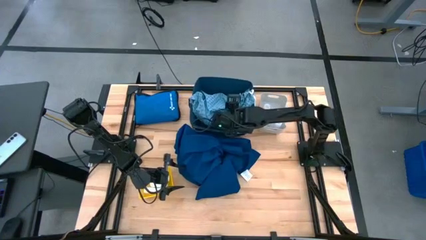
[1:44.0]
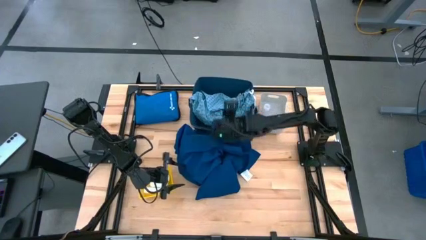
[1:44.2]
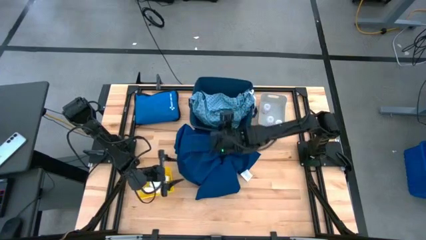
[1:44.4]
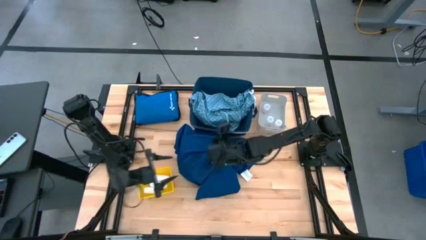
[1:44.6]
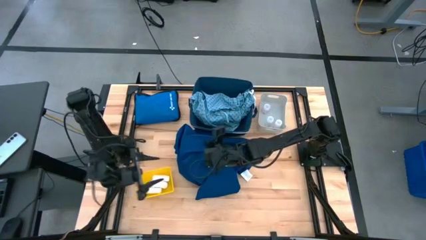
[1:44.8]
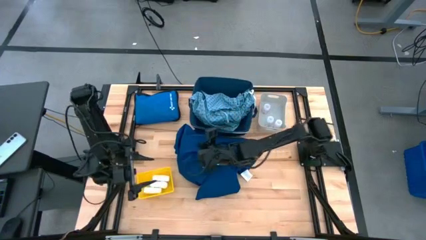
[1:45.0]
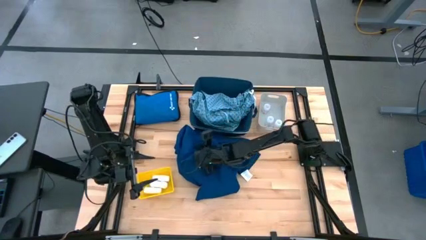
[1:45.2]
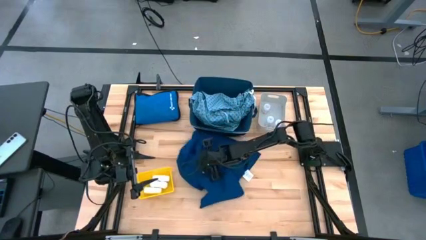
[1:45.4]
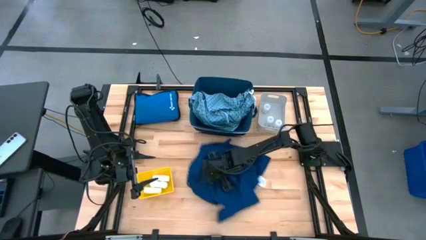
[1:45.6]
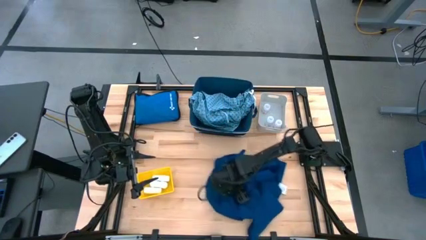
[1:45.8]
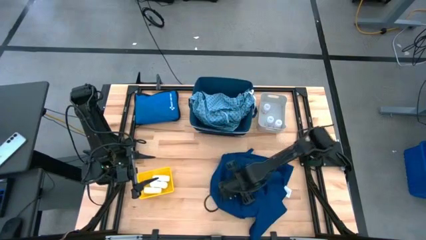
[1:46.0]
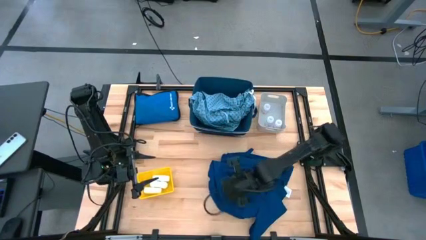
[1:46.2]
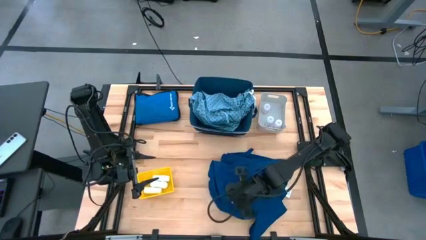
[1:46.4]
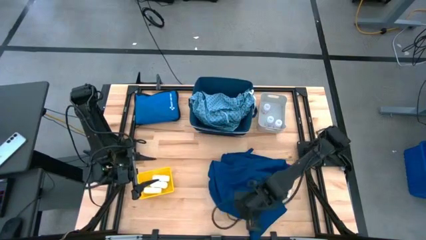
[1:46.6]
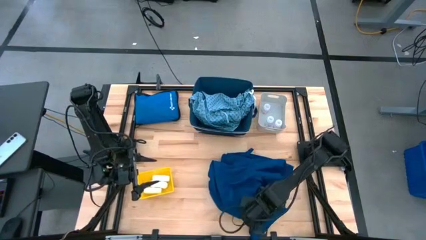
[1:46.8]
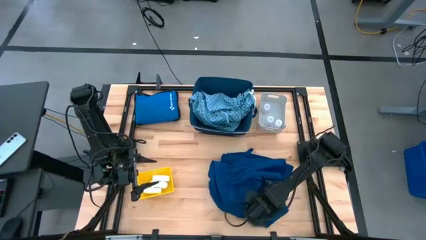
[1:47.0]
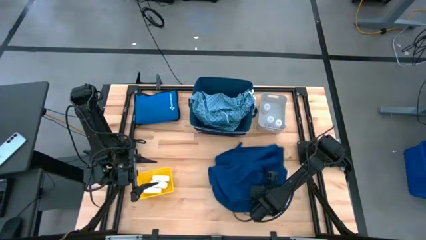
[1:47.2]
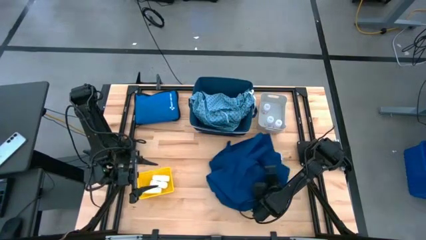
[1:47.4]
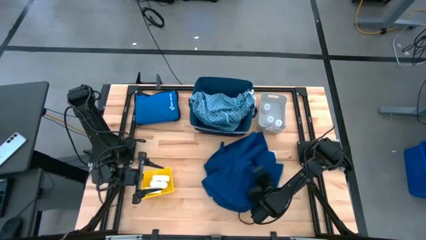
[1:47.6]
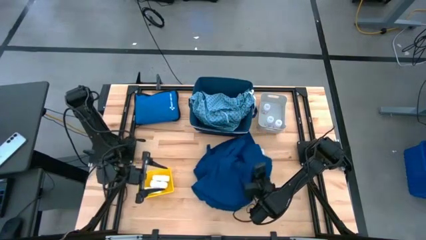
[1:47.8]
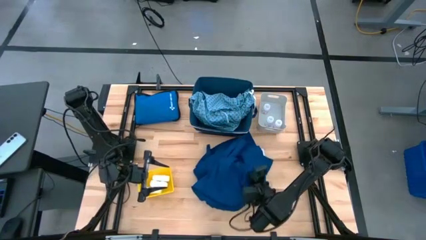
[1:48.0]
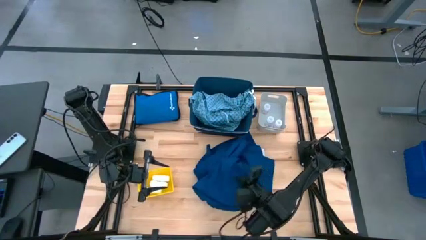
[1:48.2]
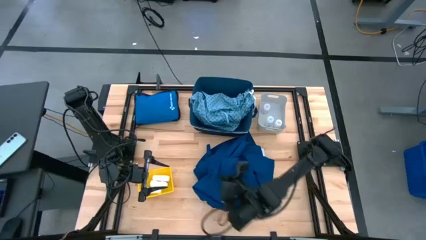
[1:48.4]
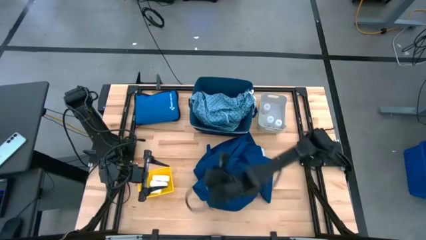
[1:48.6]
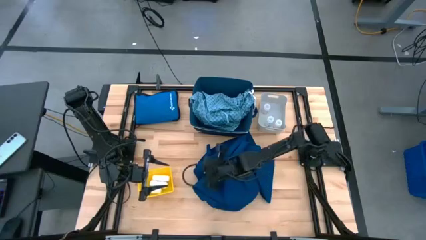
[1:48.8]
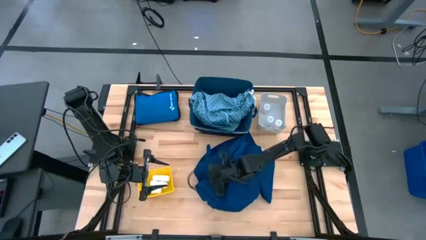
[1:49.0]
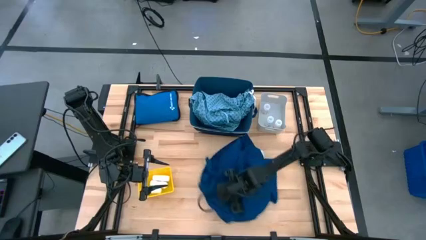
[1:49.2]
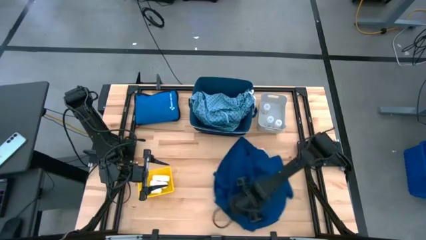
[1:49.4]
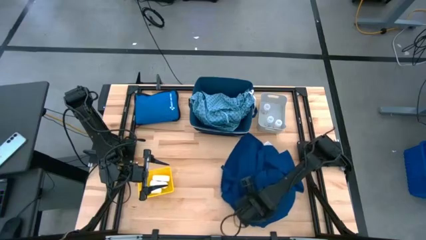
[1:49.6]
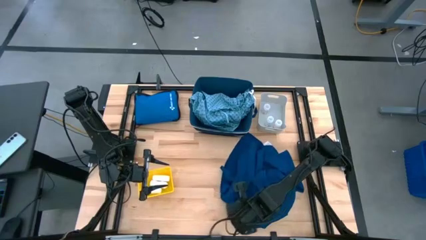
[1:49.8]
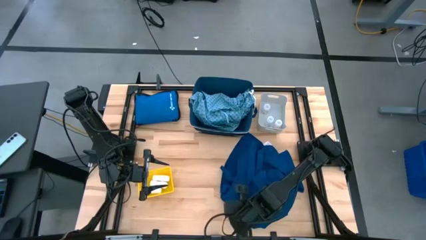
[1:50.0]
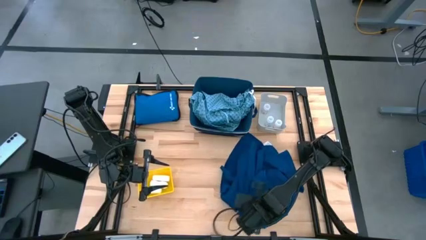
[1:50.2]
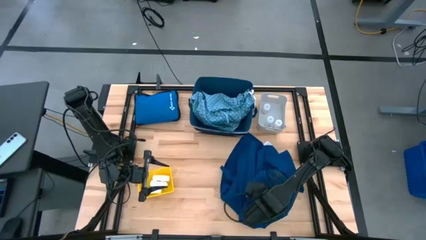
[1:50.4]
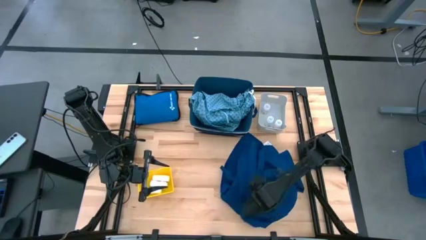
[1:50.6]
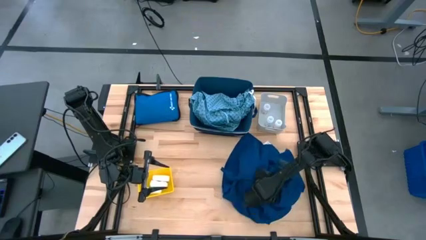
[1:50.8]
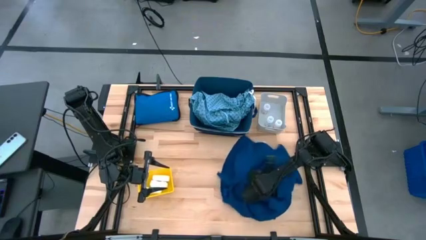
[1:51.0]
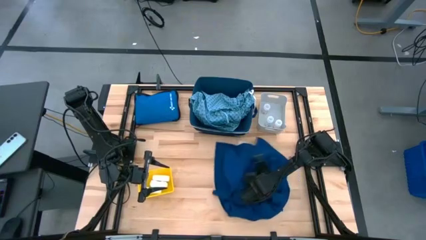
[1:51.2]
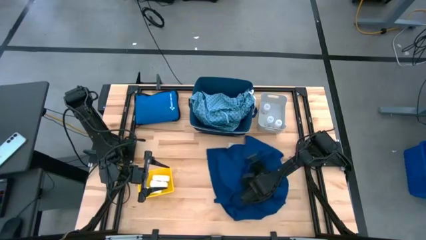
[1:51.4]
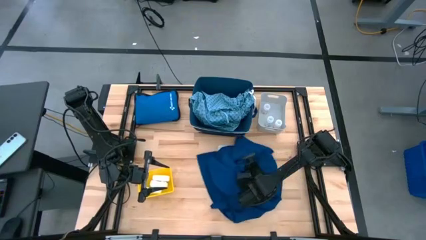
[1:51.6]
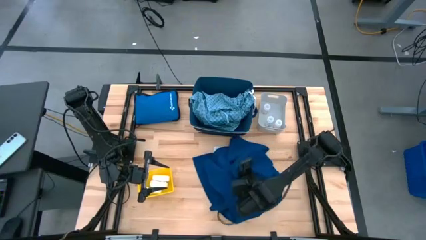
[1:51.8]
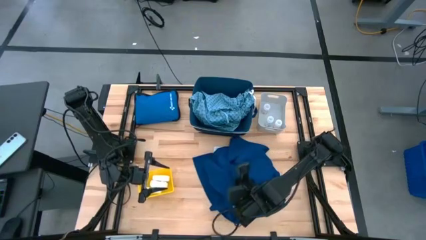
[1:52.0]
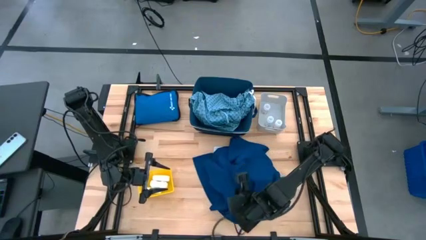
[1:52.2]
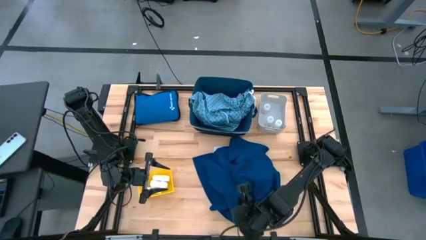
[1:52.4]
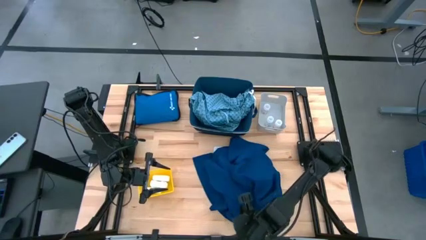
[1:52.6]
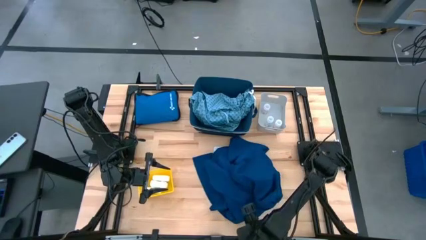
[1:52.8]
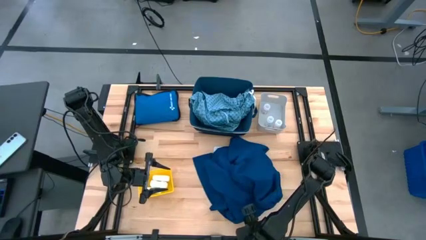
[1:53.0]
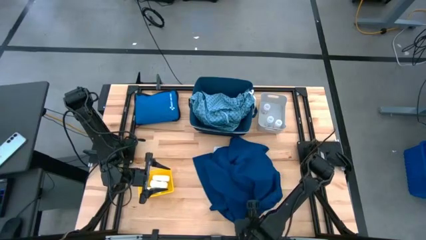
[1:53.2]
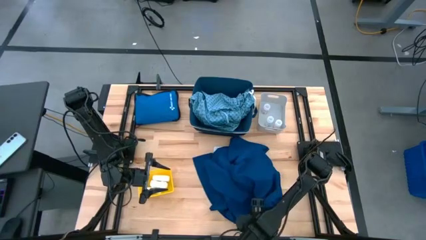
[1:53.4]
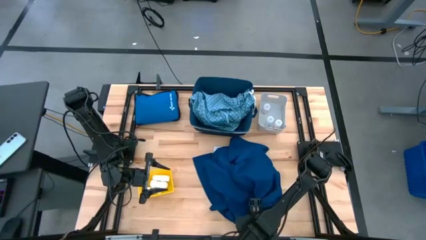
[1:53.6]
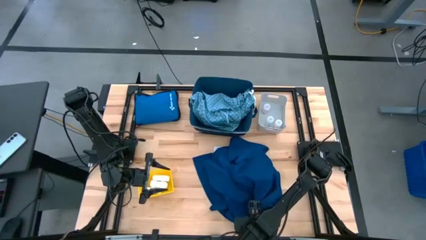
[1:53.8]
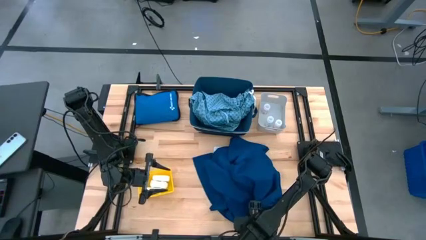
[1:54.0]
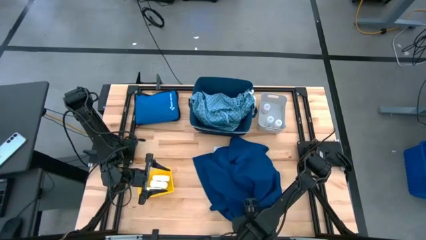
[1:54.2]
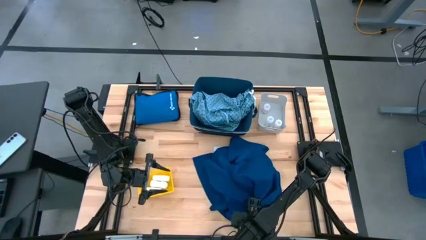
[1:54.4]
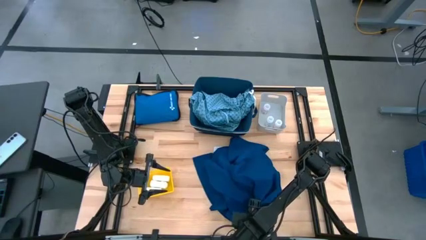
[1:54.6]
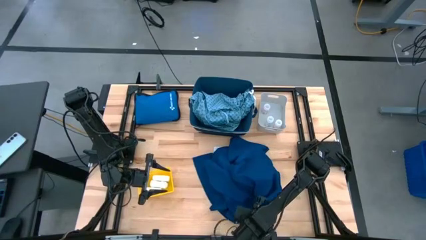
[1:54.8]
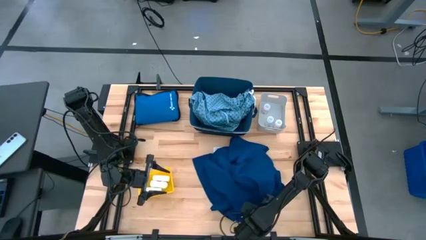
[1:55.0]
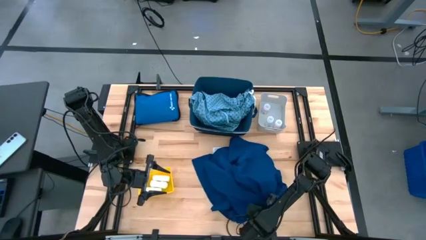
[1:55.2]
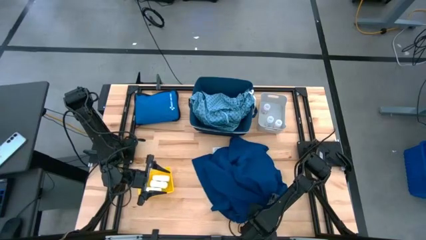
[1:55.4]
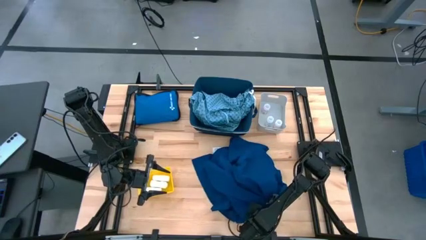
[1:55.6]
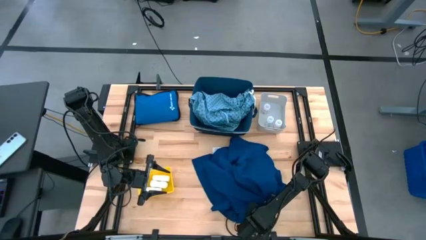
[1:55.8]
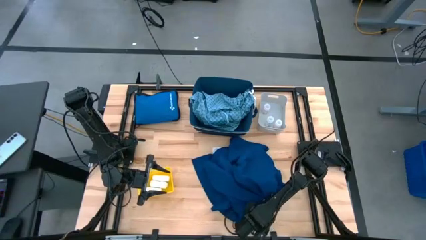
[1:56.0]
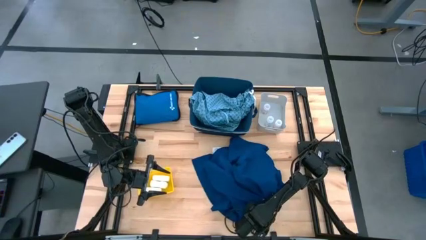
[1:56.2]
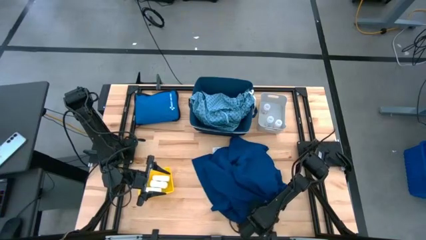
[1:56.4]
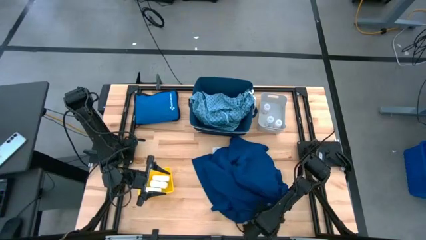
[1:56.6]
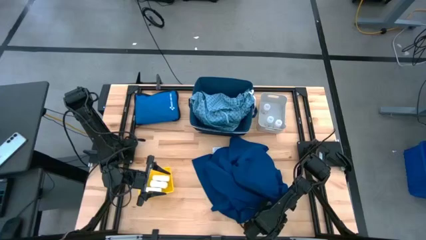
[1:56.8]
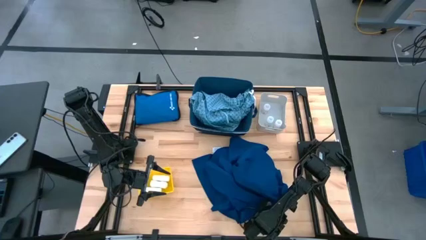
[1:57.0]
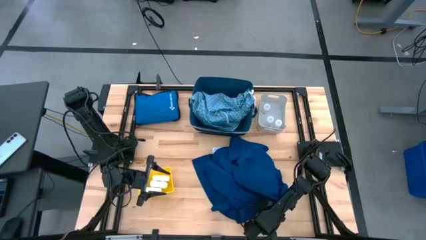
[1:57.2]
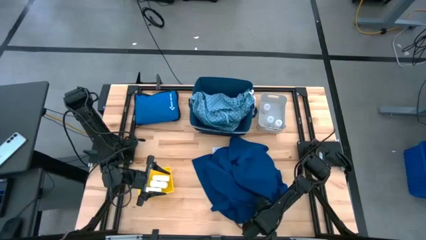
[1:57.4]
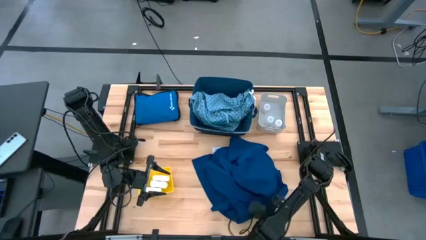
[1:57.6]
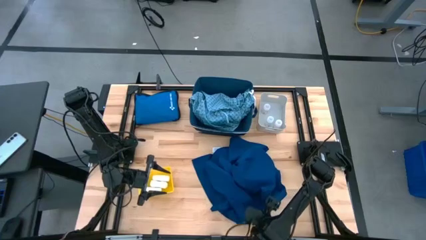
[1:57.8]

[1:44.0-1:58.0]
Task: Pick & Place Medicine items
Put the blue patient gown into the blue bin

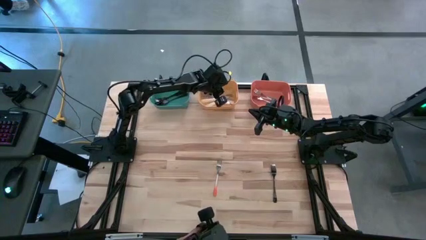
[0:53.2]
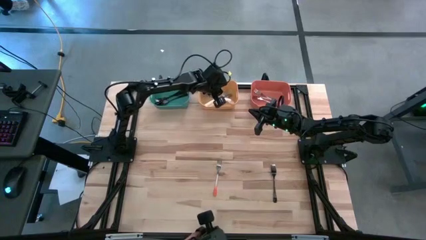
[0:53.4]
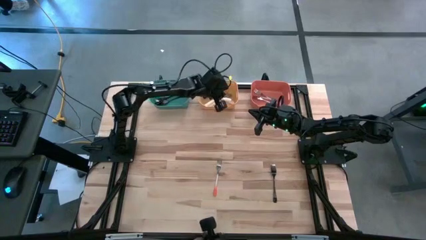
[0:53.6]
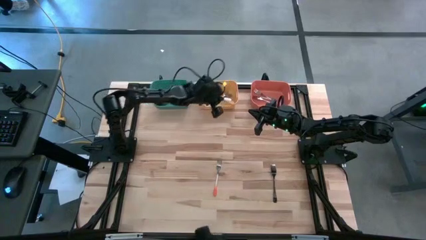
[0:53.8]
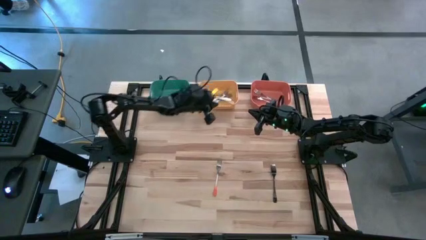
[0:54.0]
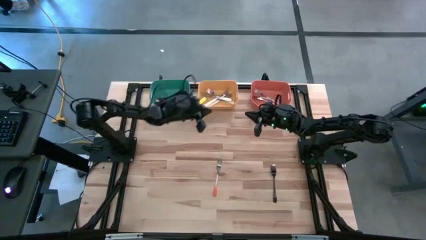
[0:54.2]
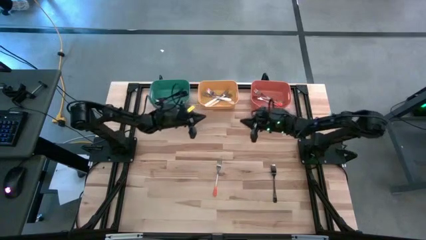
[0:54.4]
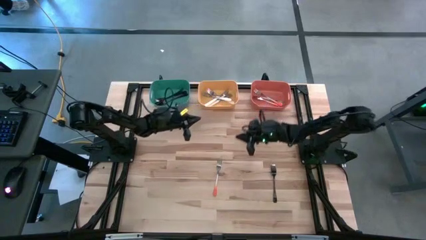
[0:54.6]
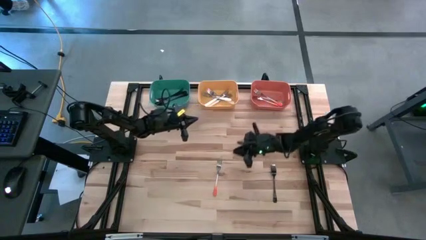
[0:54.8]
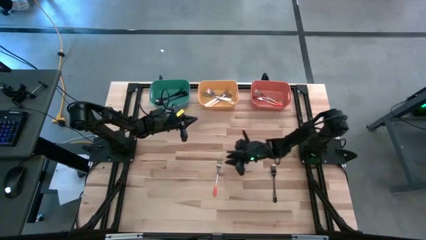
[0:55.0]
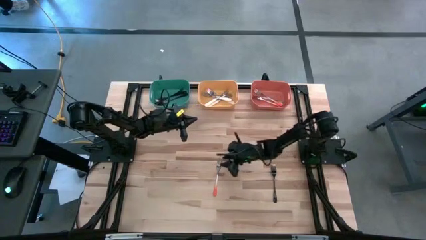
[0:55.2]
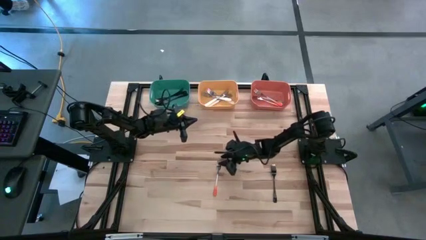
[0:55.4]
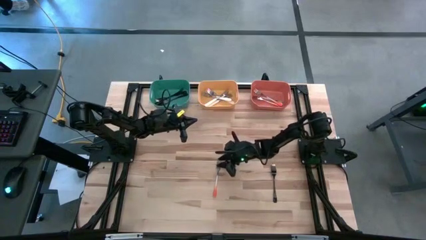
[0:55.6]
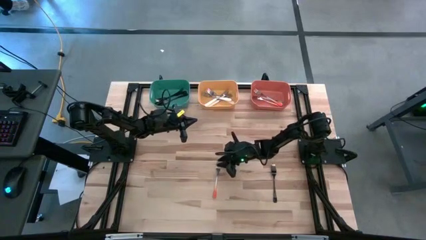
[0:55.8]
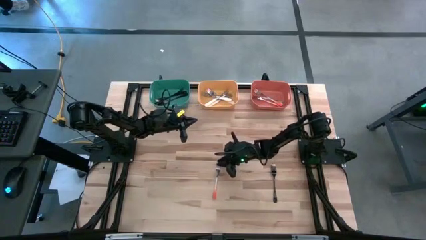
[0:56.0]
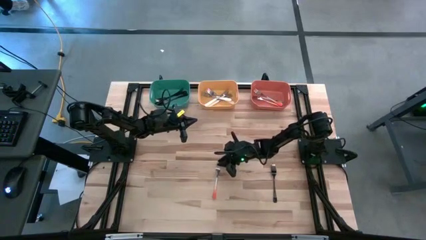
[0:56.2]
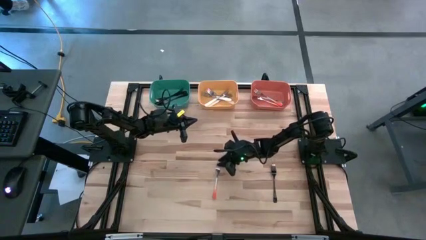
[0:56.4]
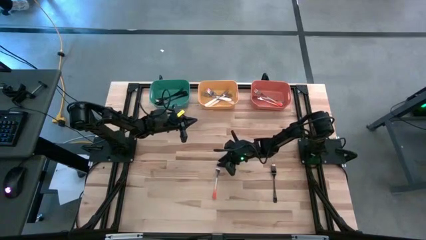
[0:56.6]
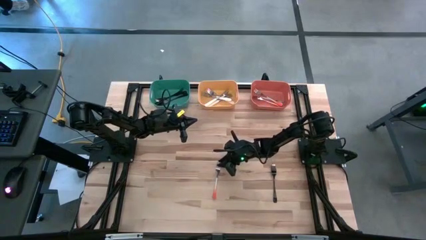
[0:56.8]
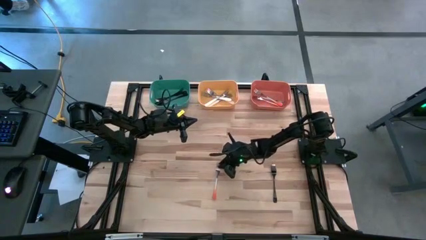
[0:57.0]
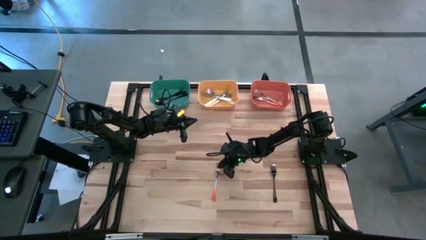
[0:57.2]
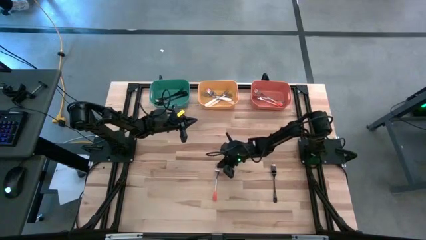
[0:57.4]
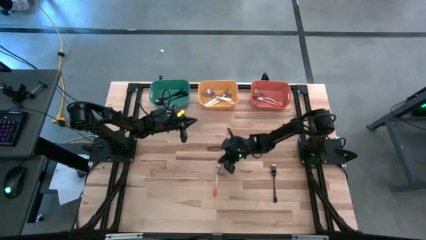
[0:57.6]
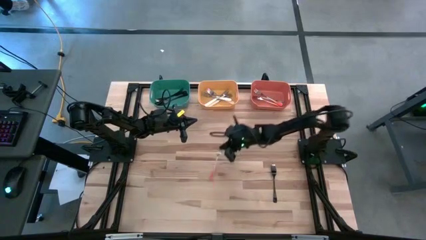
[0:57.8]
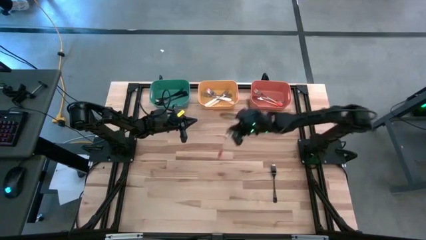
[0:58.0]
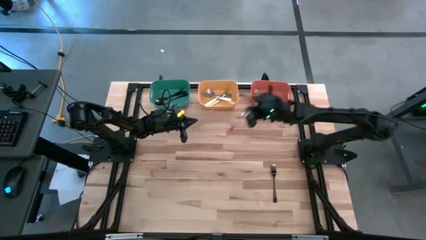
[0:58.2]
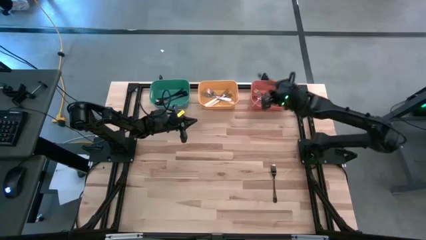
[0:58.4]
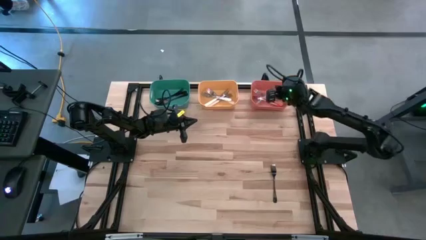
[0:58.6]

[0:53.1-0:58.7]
Task: Sort silverware by color (type)
Put the orange fork into the orange bin
